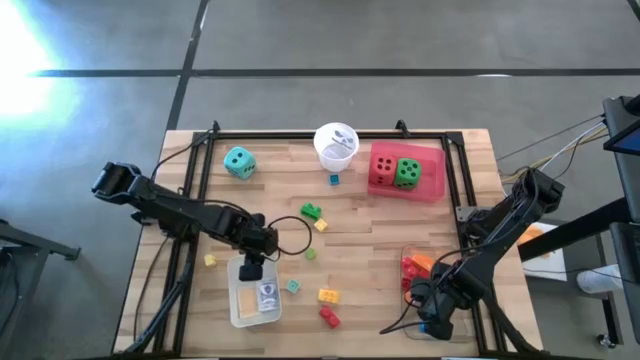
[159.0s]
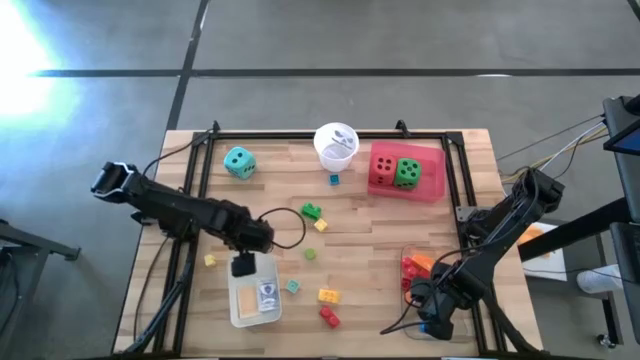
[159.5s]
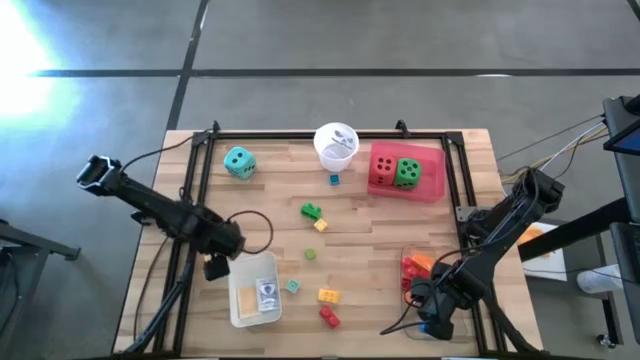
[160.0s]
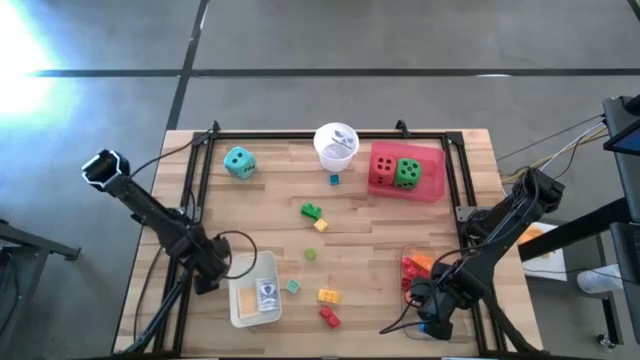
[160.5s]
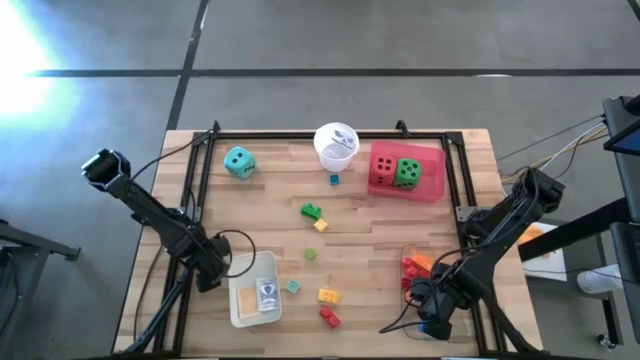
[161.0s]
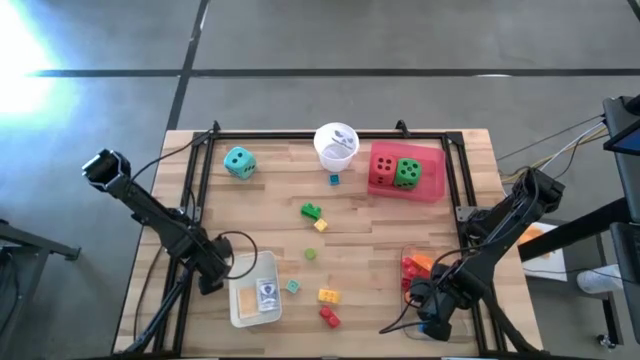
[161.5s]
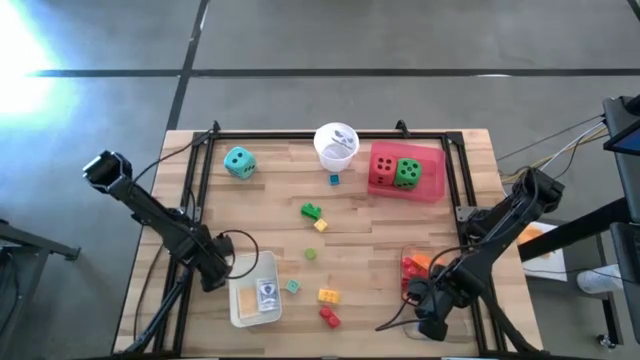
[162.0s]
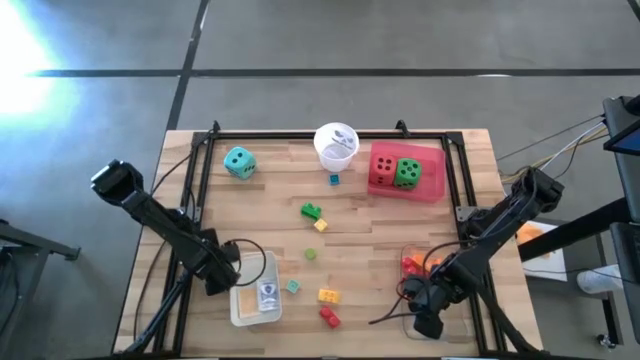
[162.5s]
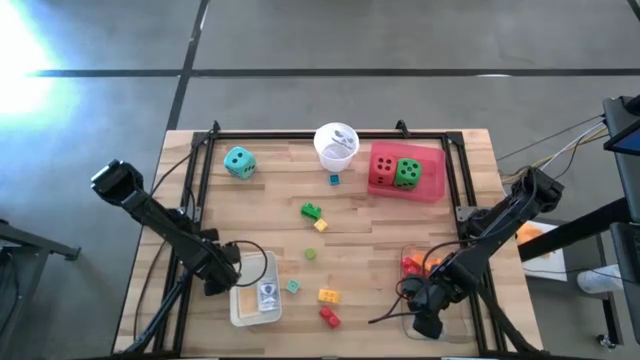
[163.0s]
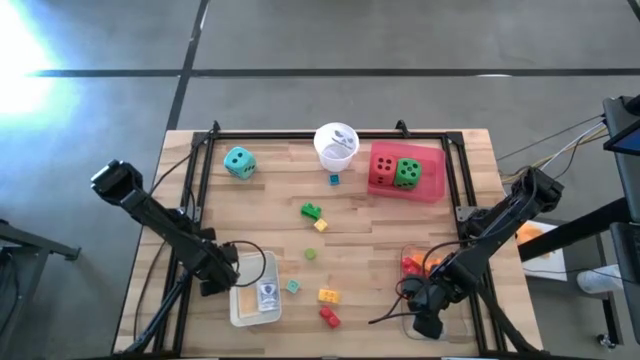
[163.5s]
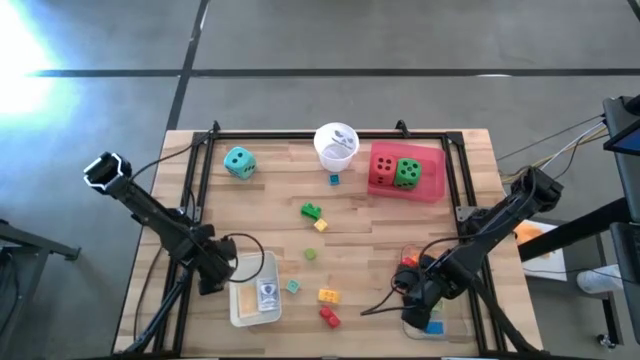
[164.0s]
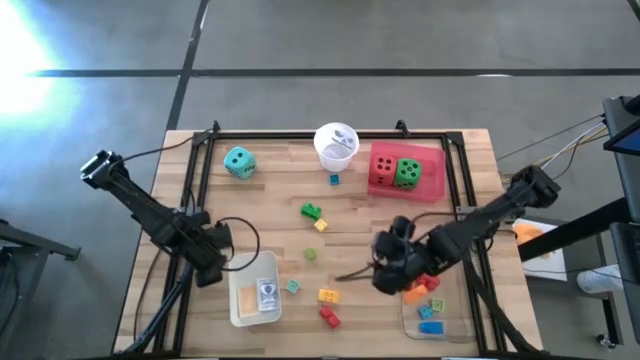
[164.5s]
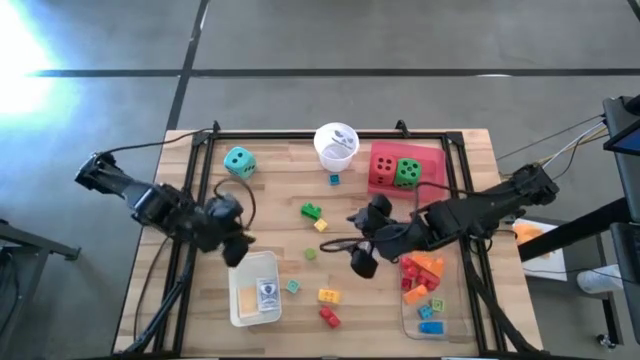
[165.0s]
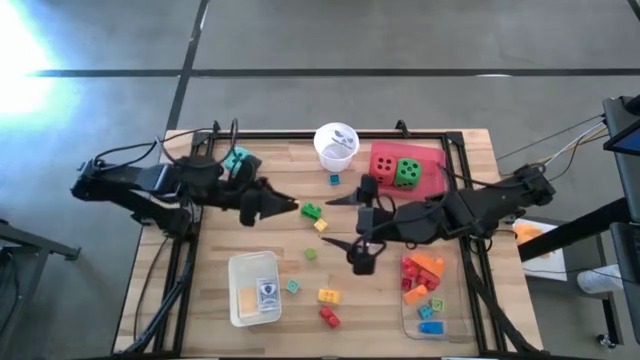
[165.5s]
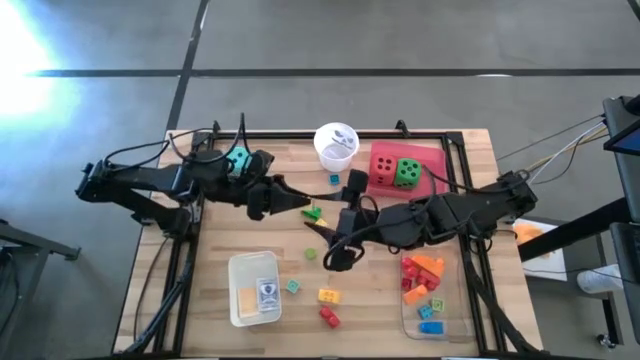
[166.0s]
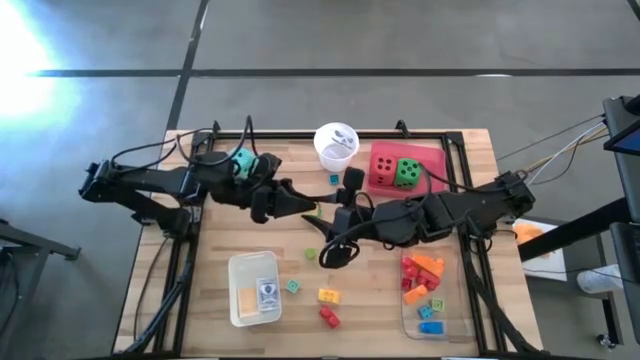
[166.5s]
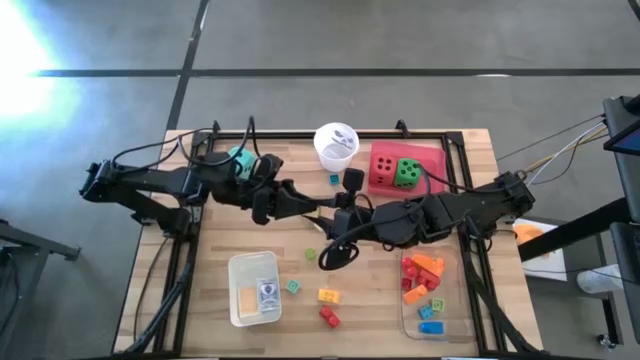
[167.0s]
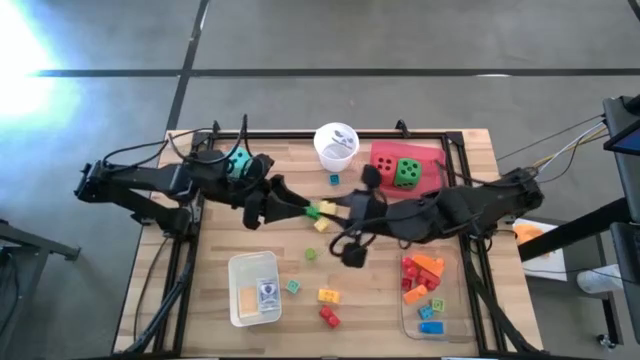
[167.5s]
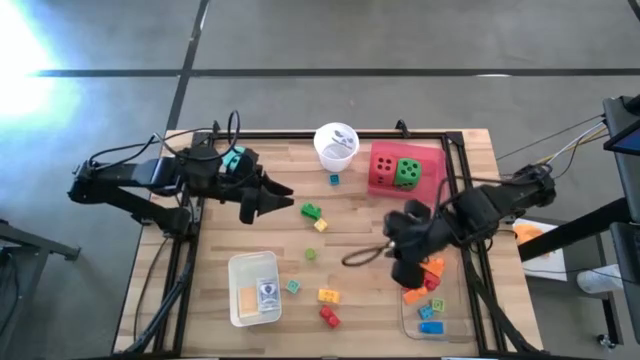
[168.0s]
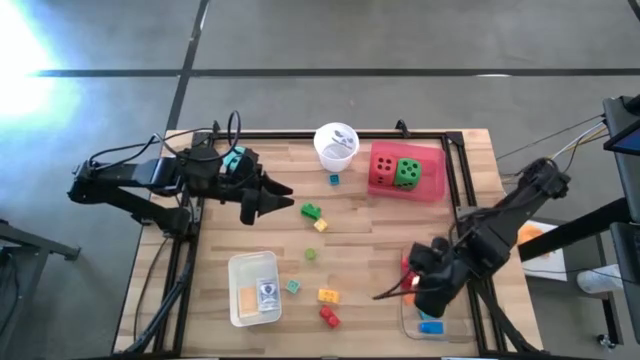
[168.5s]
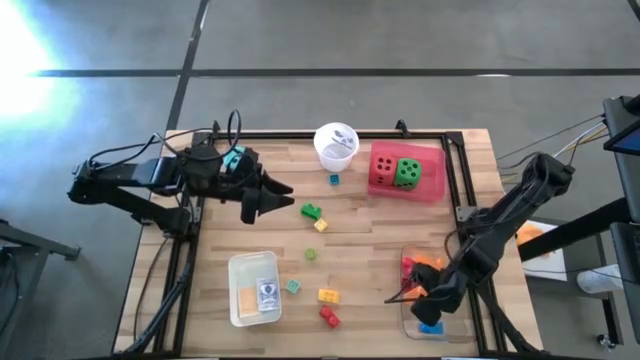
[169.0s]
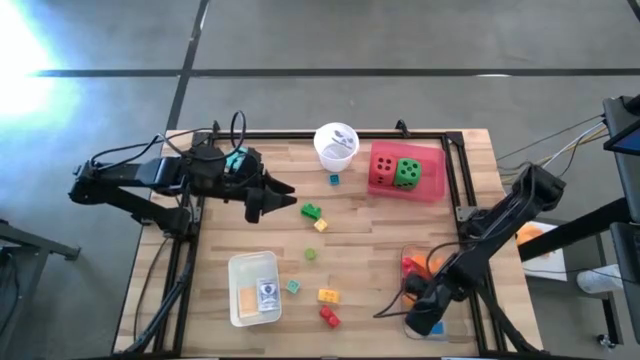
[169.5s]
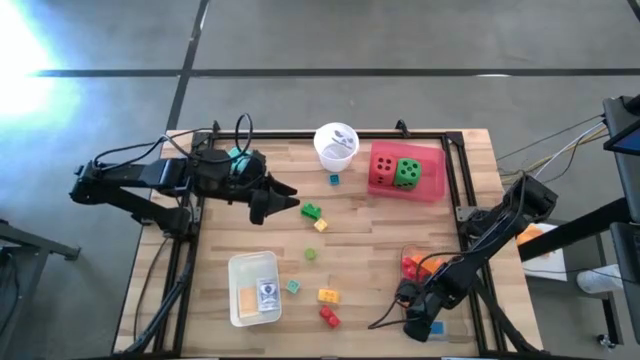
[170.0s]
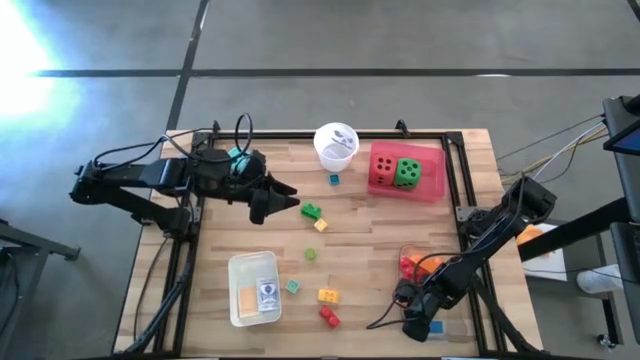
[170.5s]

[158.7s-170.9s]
Task: Pick & Place Toys
Put the light yellow game piece into the transparent bin

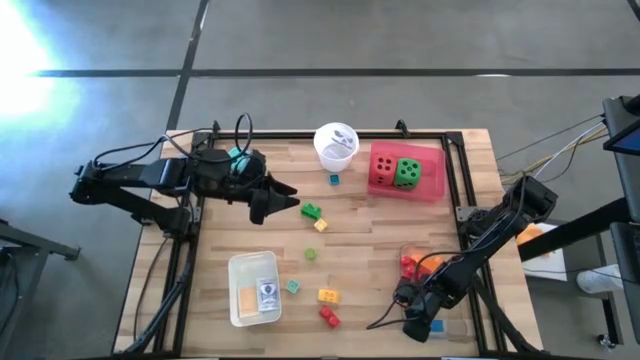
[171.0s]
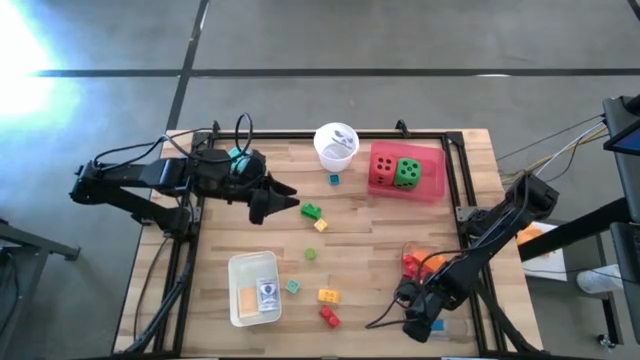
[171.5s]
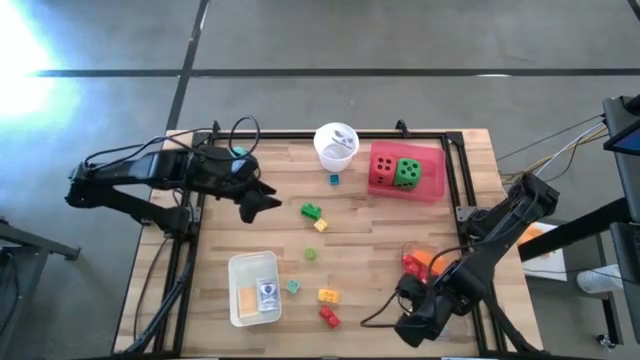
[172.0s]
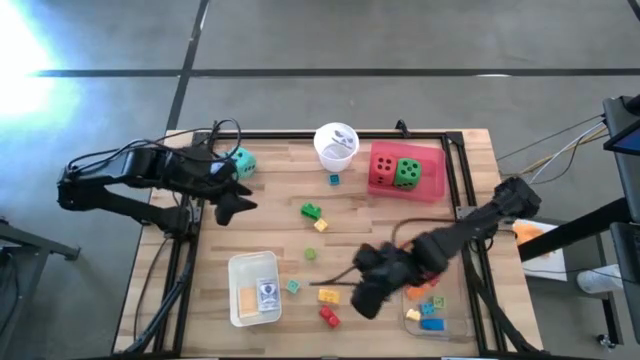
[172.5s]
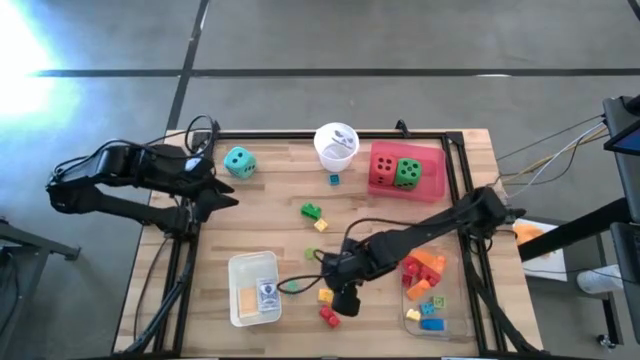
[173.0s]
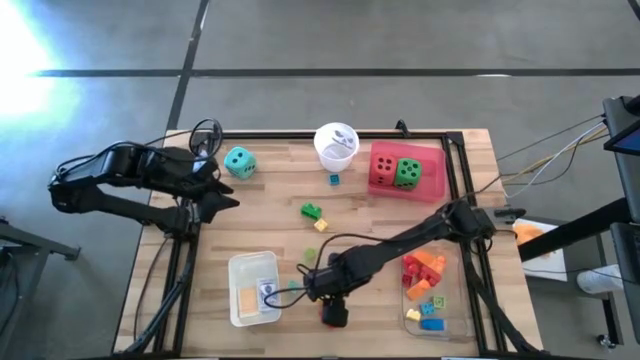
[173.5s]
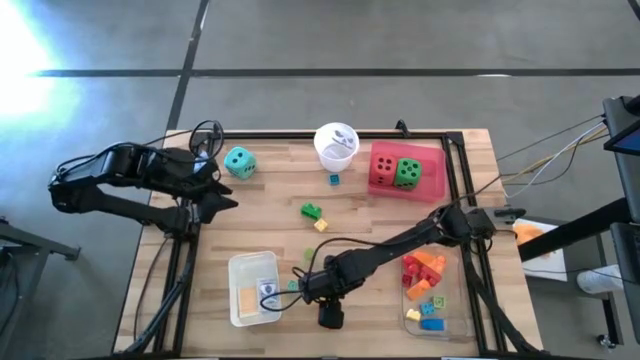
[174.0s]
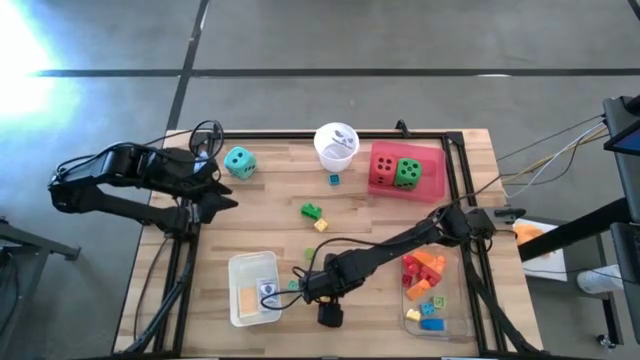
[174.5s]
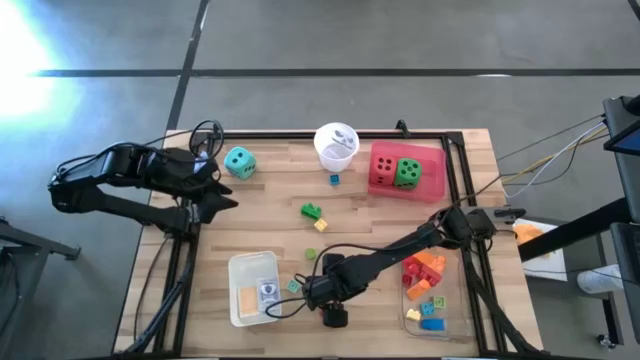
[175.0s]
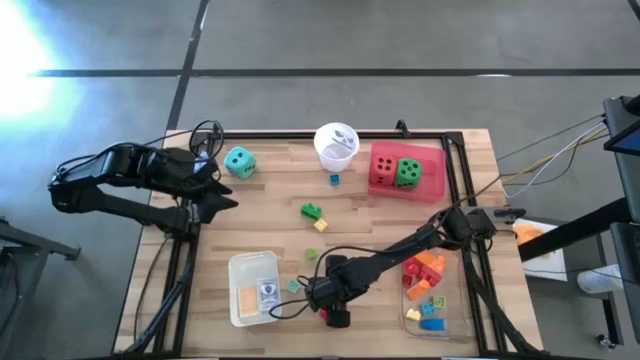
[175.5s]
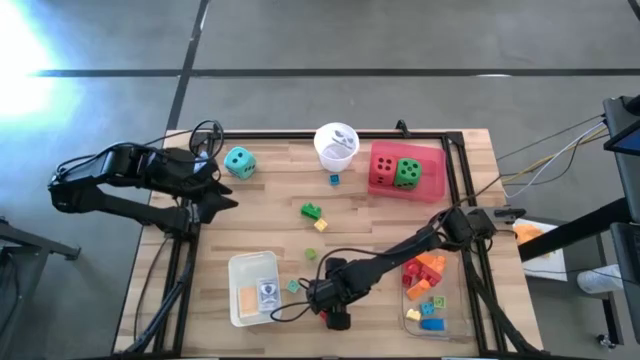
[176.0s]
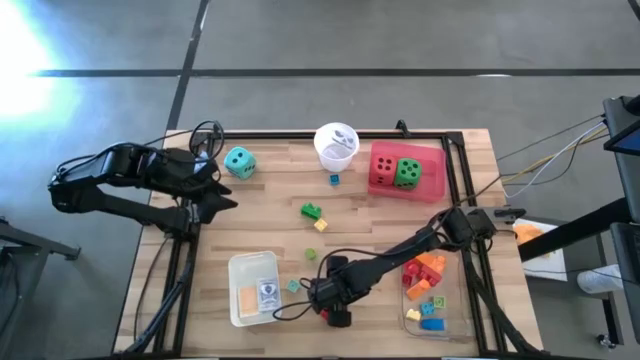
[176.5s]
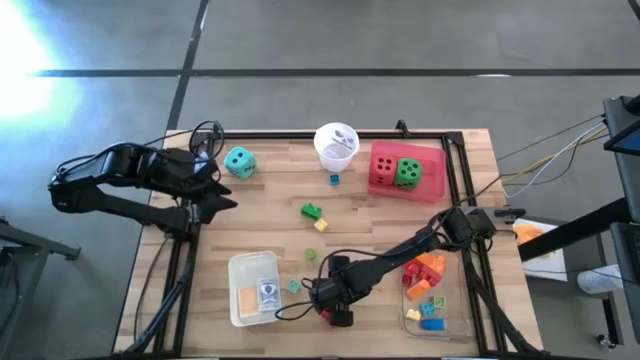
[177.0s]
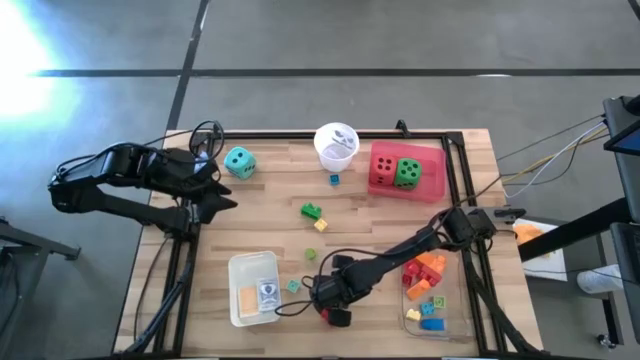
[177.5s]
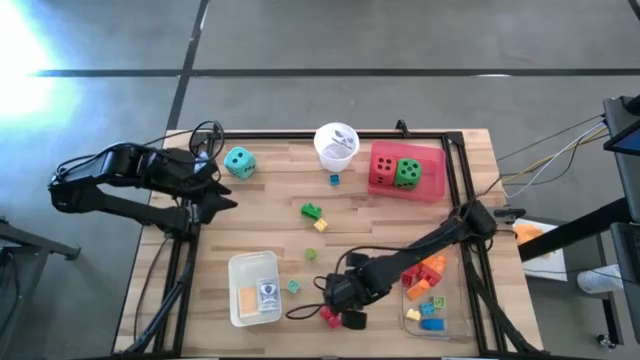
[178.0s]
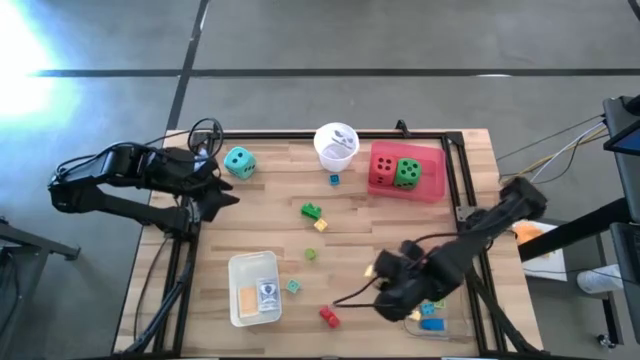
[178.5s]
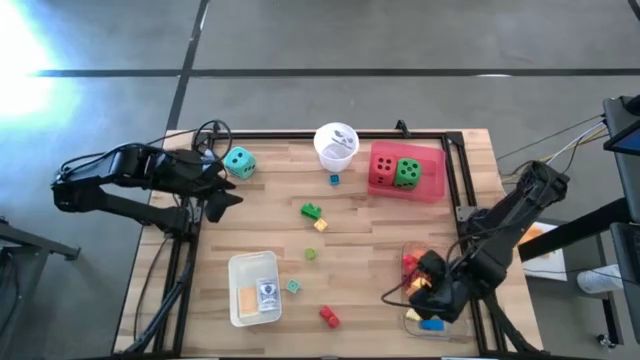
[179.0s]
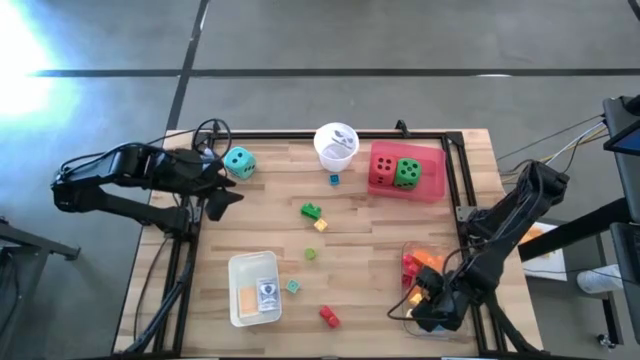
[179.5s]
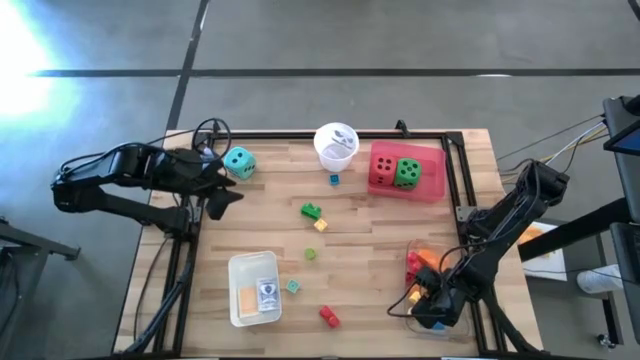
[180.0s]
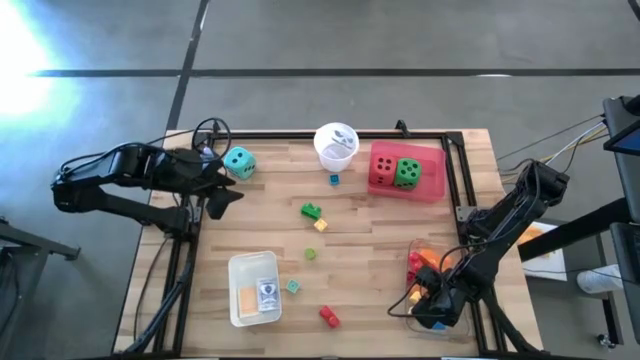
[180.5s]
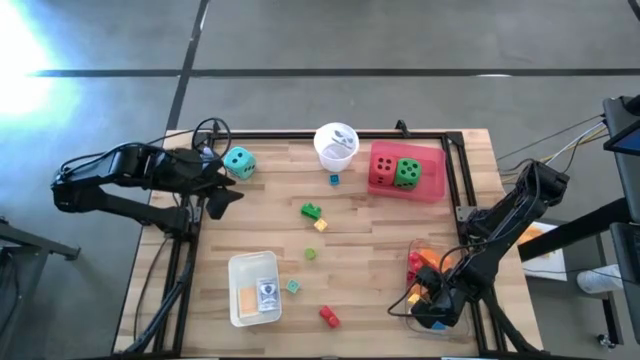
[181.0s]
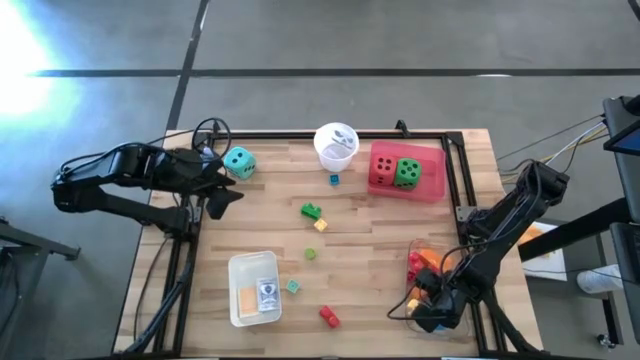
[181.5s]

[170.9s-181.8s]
Put the yellow game piece into the transparent bin
